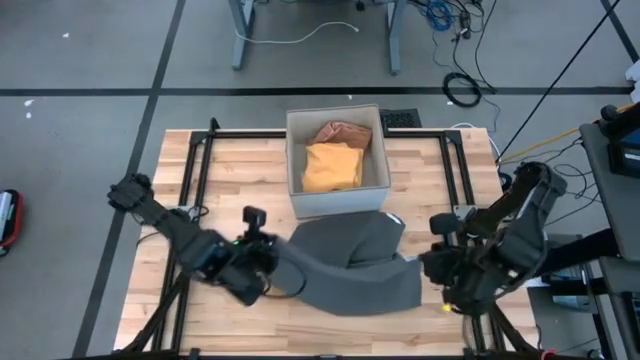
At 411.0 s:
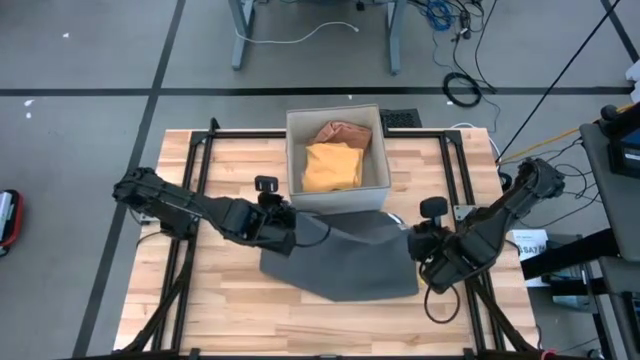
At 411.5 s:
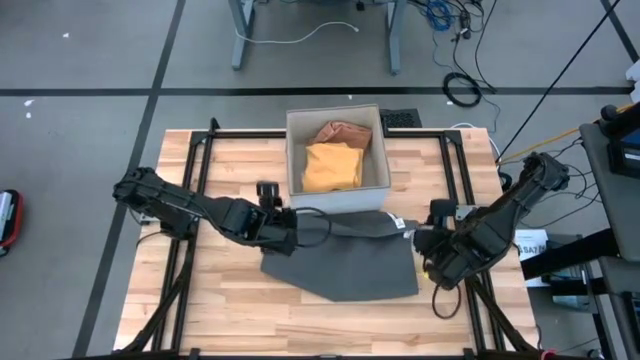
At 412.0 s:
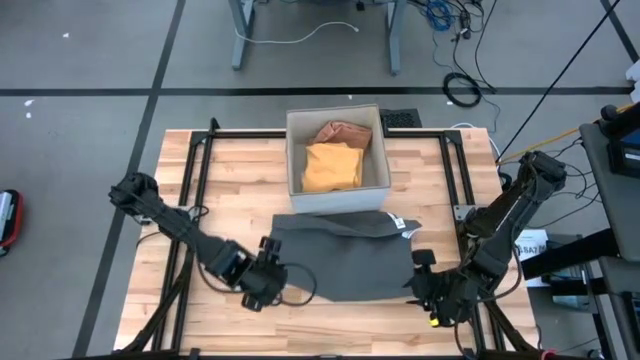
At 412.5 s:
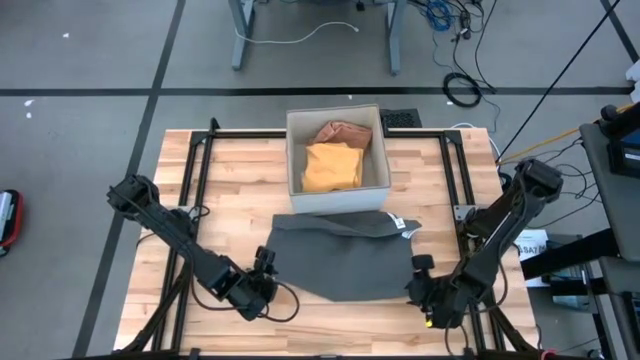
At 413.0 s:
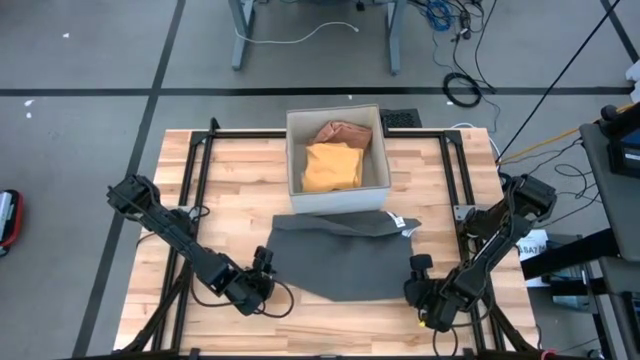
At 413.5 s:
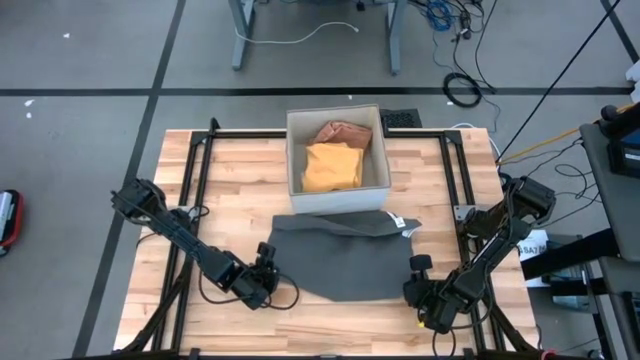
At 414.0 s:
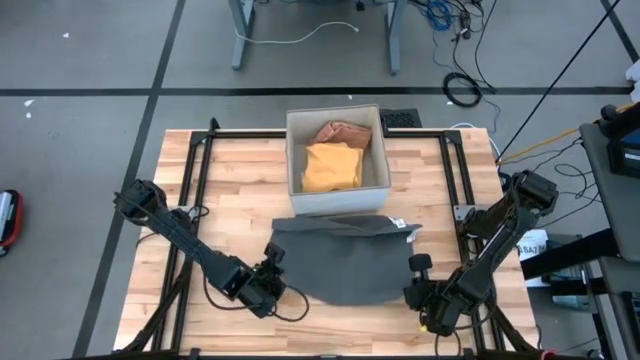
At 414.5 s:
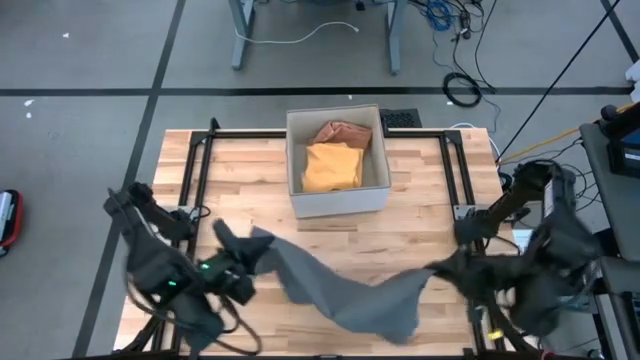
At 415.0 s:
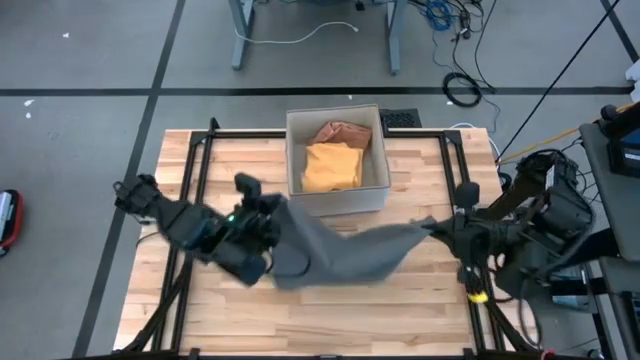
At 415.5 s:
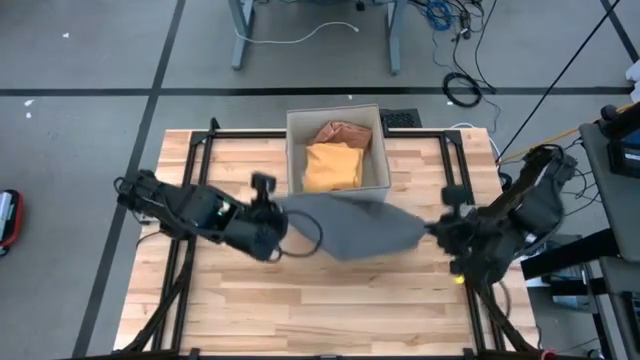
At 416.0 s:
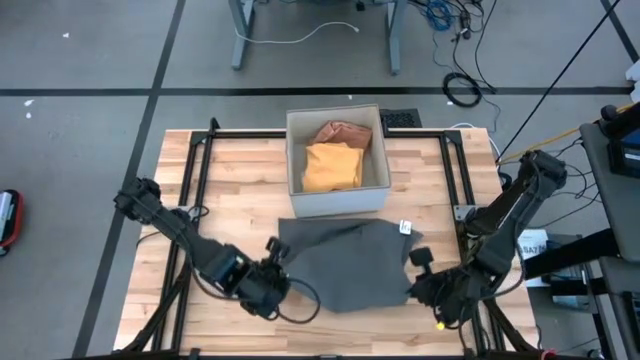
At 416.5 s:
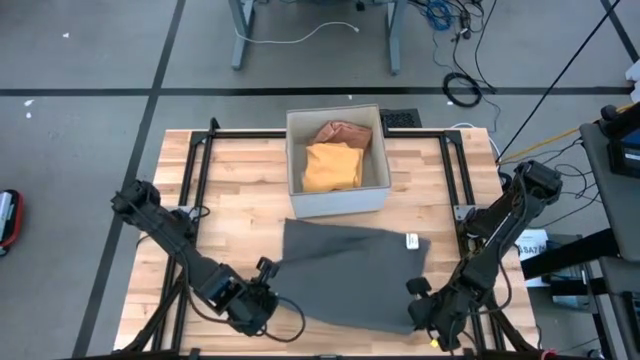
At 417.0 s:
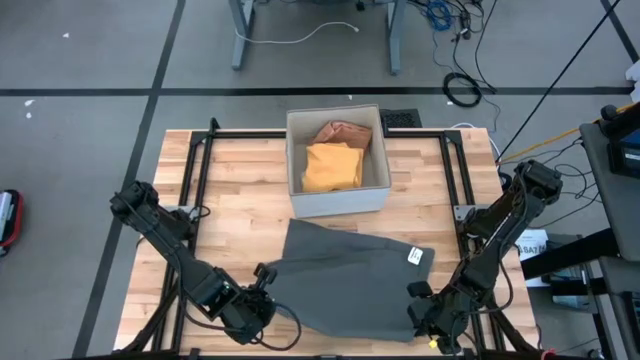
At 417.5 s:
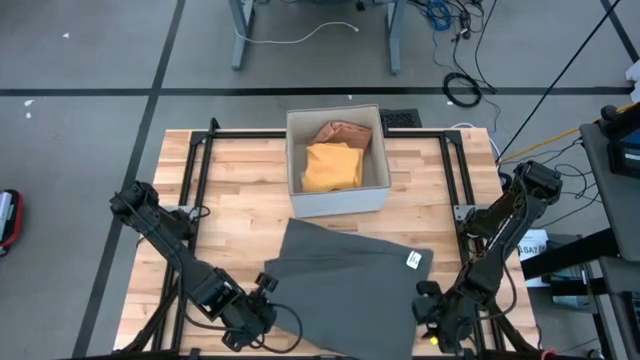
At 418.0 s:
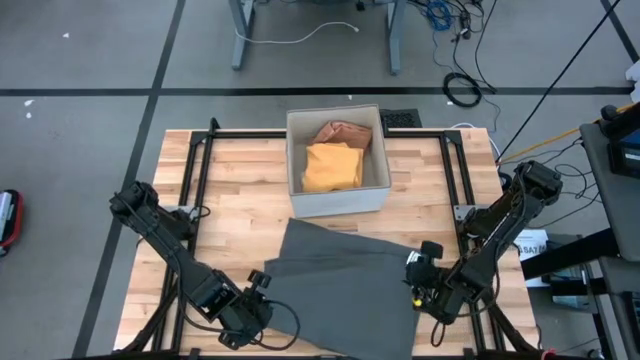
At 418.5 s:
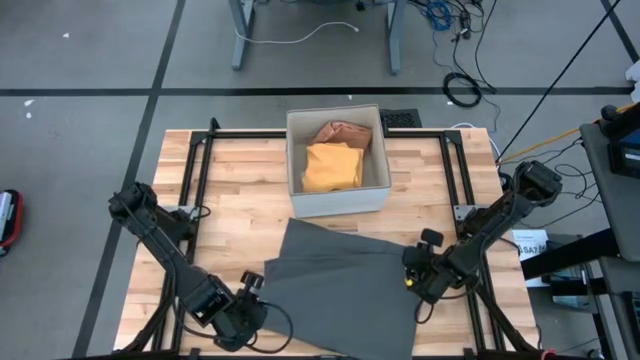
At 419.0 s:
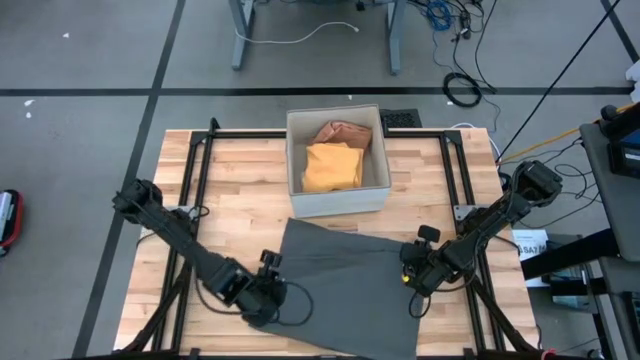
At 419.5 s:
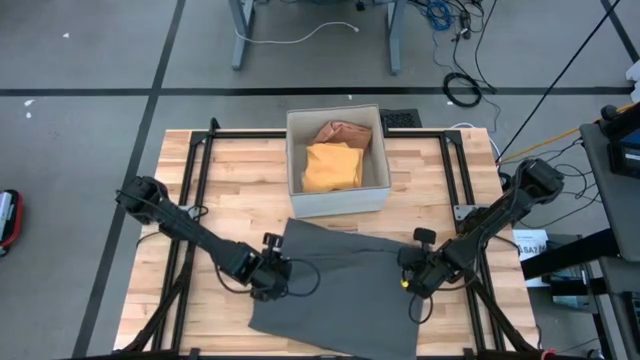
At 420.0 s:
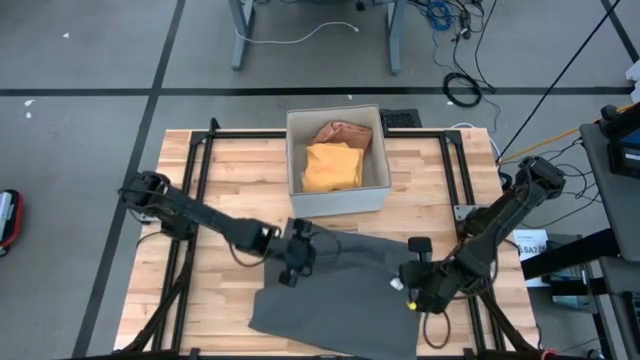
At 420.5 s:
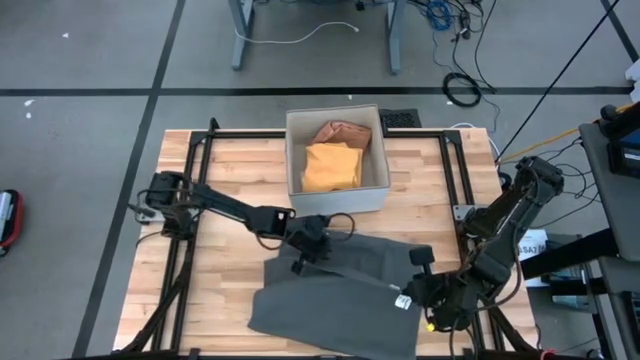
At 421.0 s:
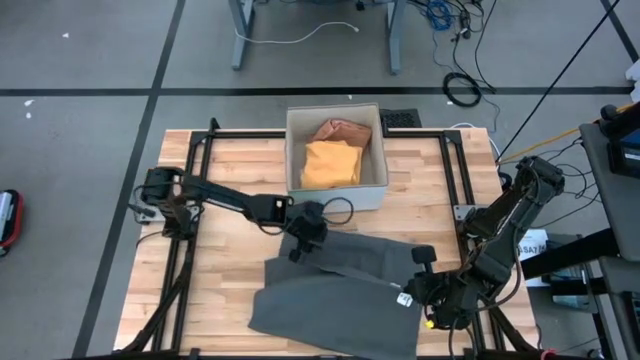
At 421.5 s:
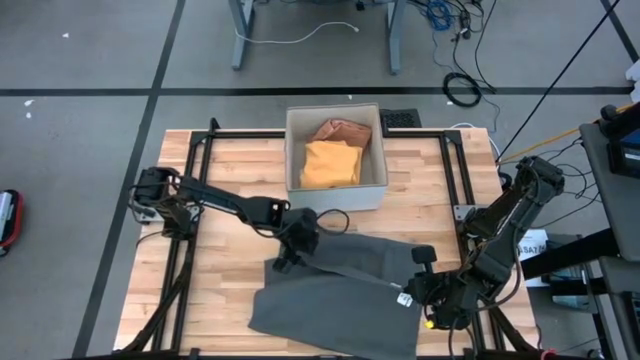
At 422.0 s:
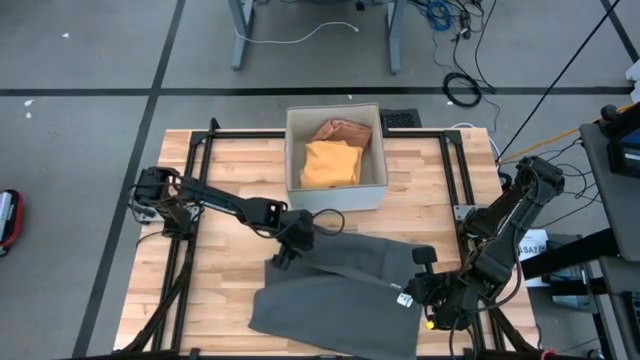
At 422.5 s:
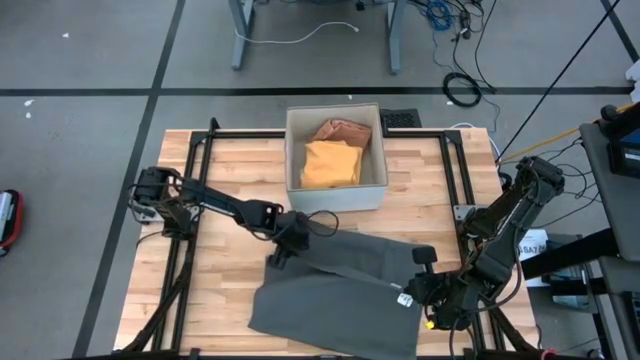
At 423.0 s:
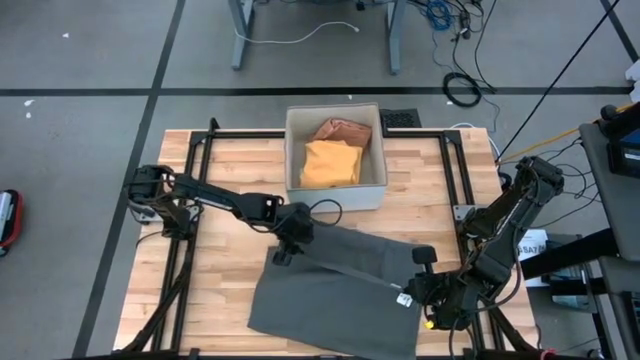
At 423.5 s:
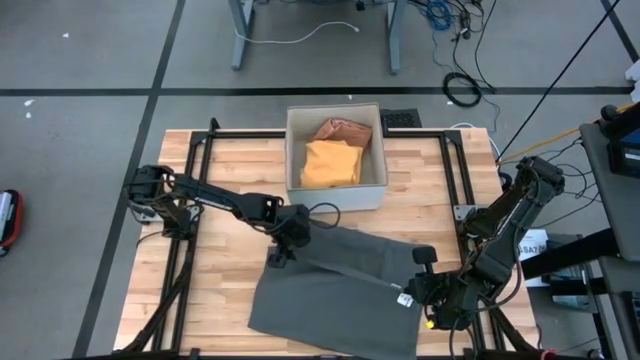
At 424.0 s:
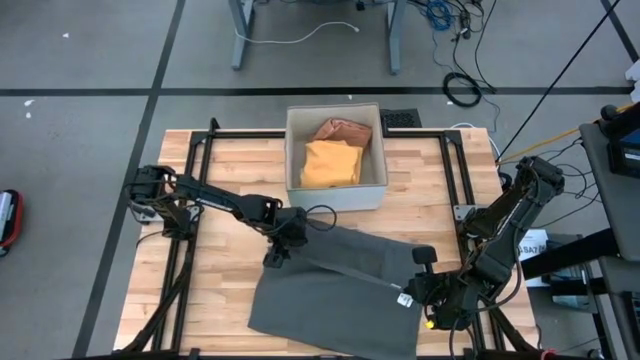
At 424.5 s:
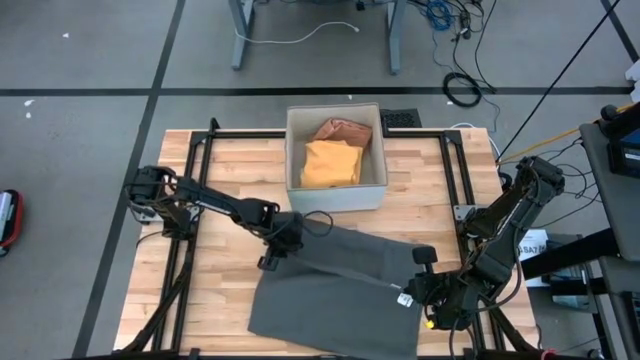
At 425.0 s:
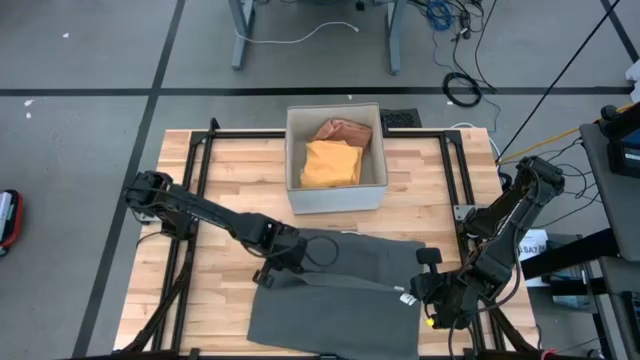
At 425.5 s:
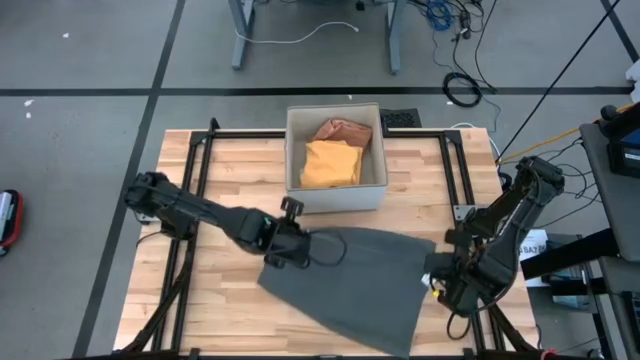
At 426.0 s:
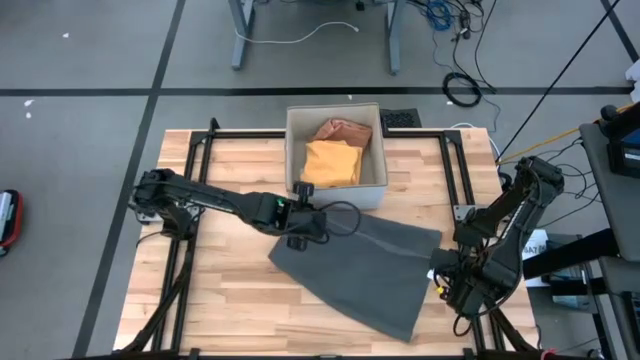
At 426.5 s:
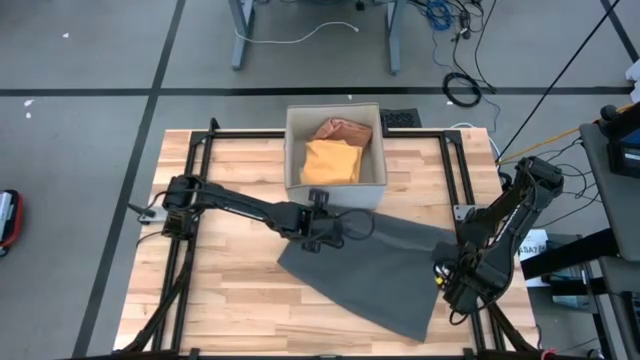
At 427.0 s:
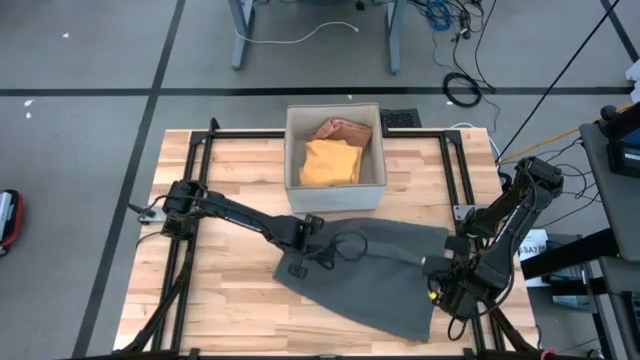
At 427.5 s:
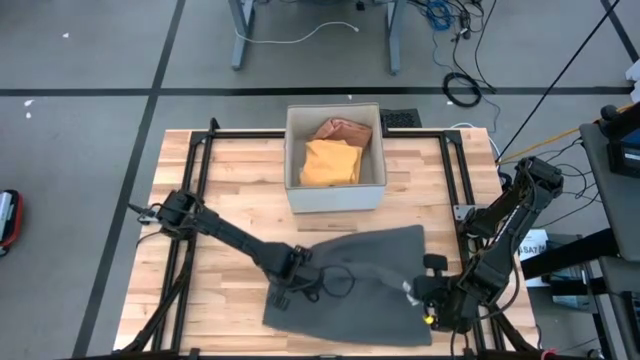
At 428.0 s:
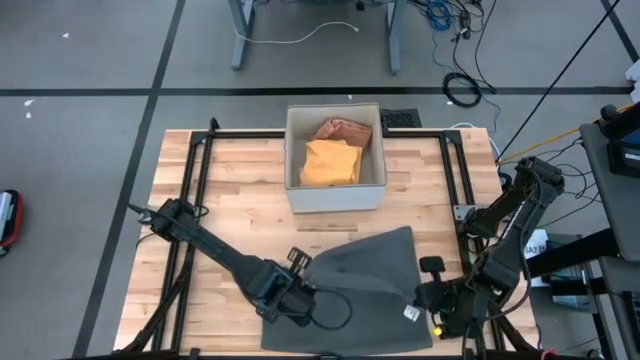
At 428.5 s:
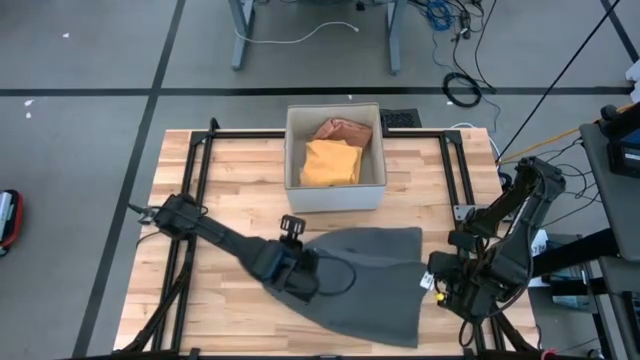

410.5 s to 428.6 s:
Task: Fold towel
Fold the gray towel
